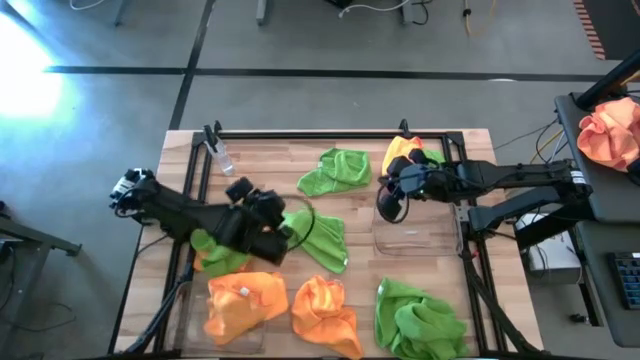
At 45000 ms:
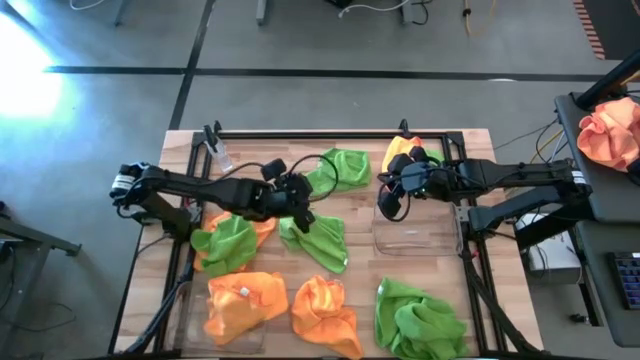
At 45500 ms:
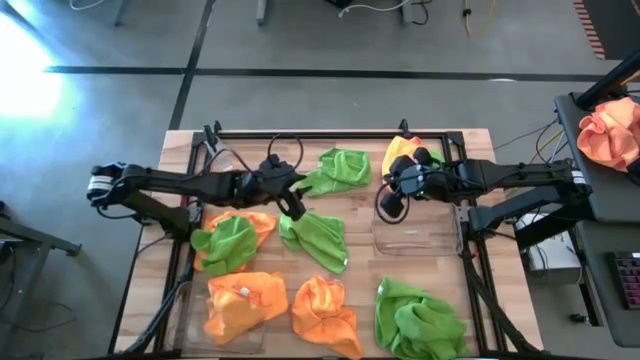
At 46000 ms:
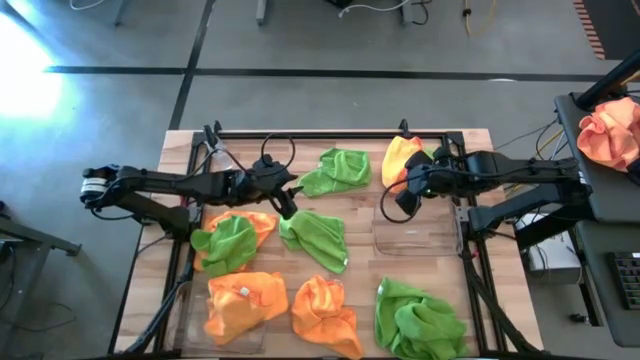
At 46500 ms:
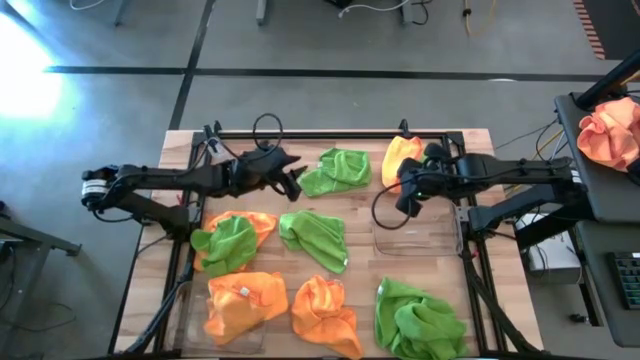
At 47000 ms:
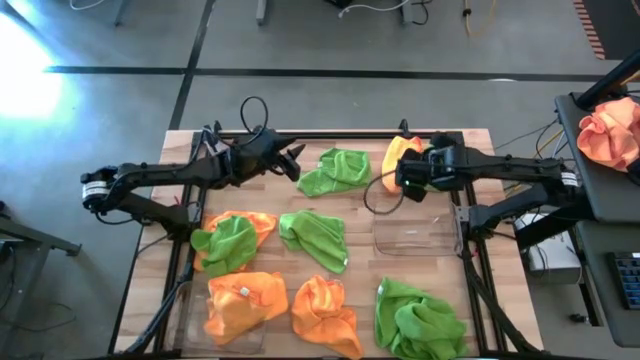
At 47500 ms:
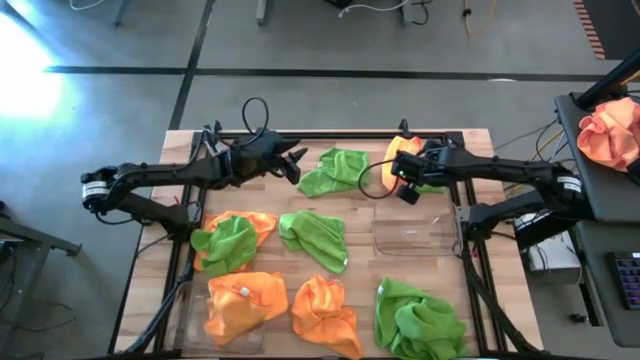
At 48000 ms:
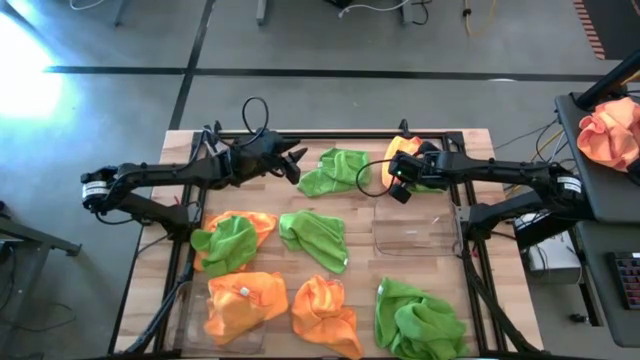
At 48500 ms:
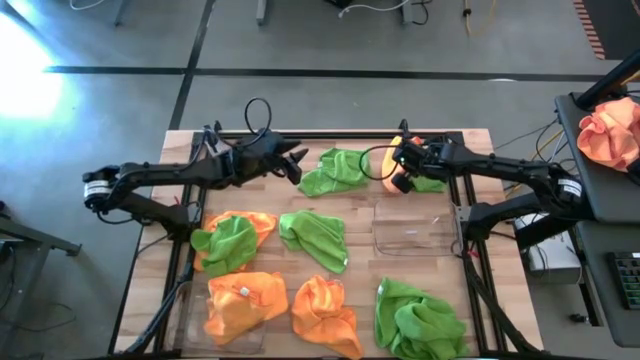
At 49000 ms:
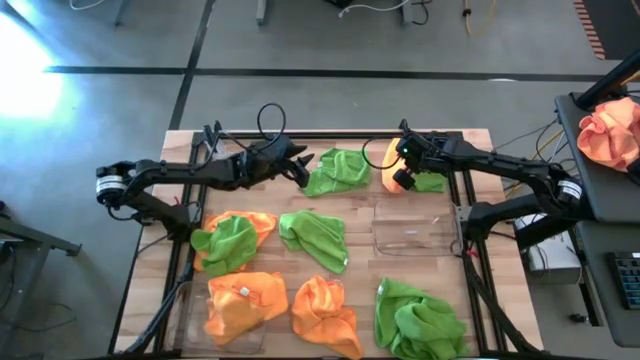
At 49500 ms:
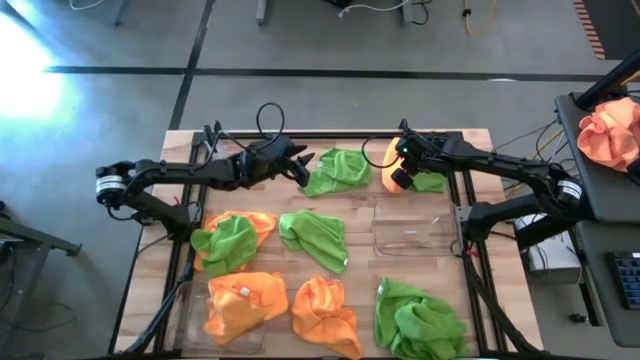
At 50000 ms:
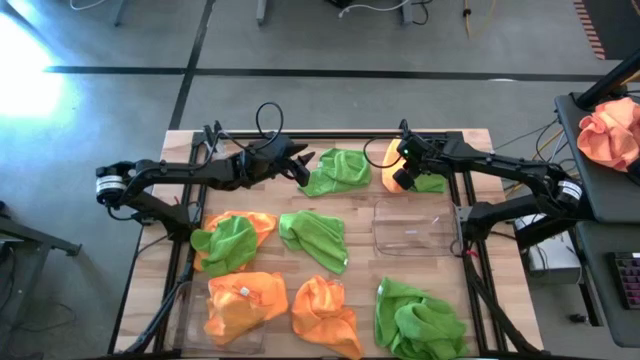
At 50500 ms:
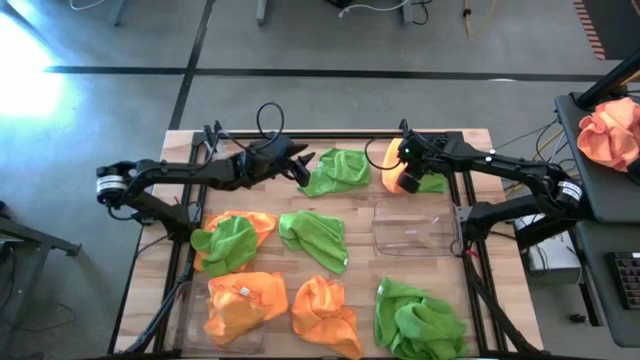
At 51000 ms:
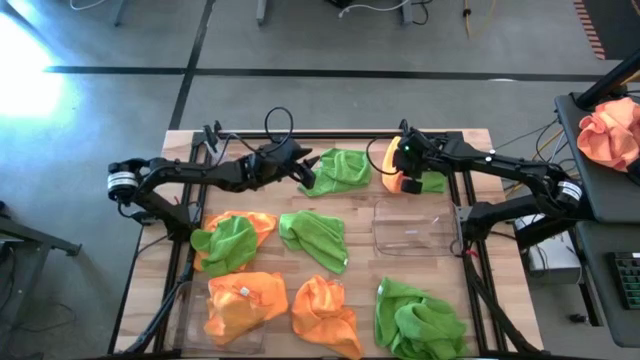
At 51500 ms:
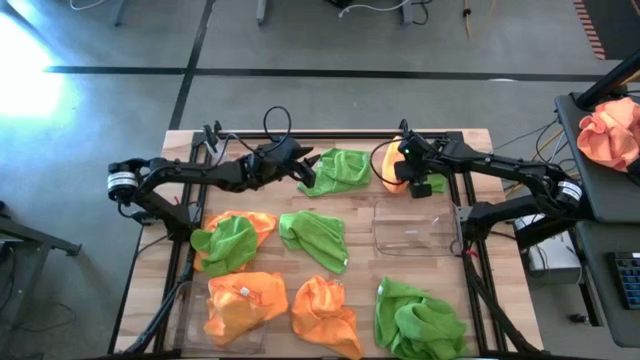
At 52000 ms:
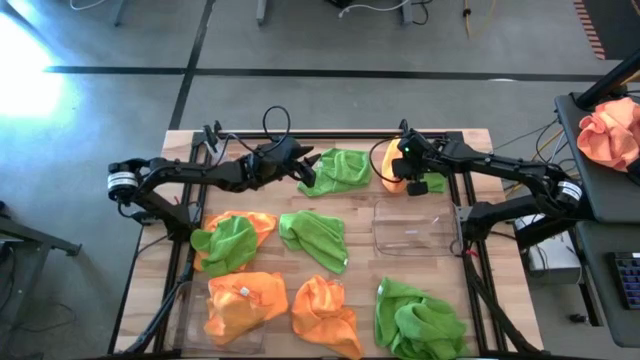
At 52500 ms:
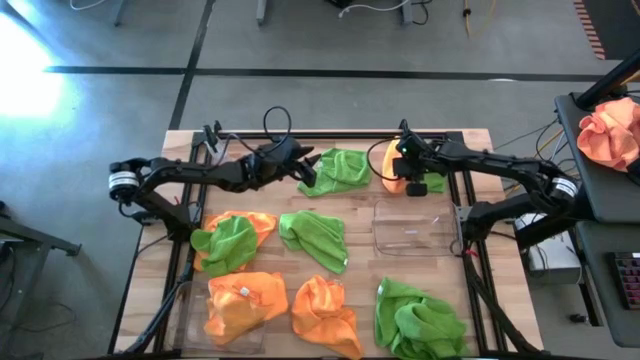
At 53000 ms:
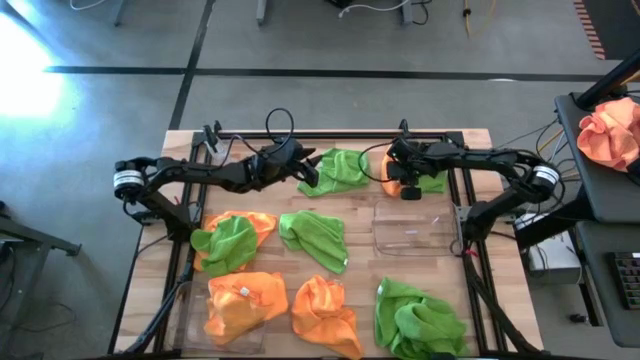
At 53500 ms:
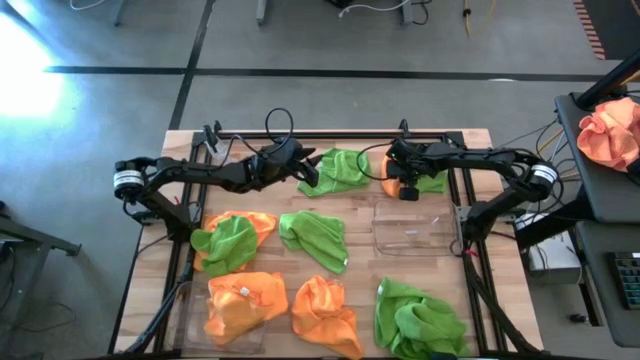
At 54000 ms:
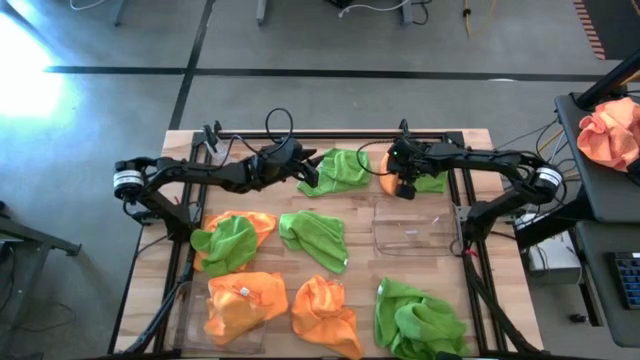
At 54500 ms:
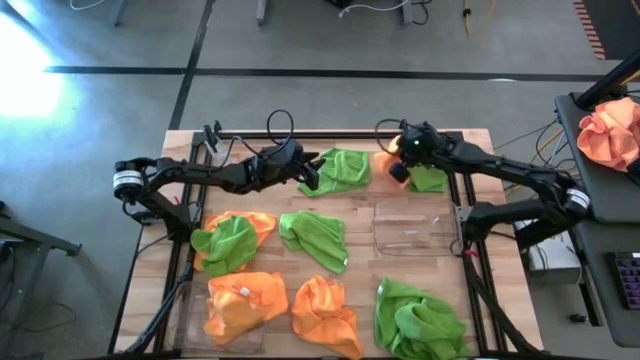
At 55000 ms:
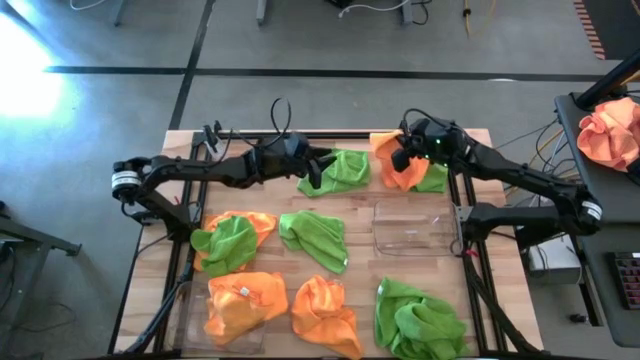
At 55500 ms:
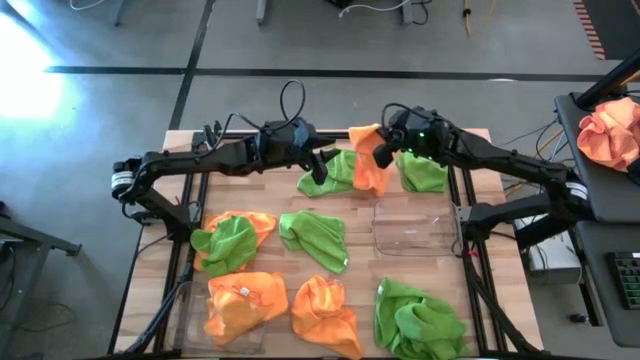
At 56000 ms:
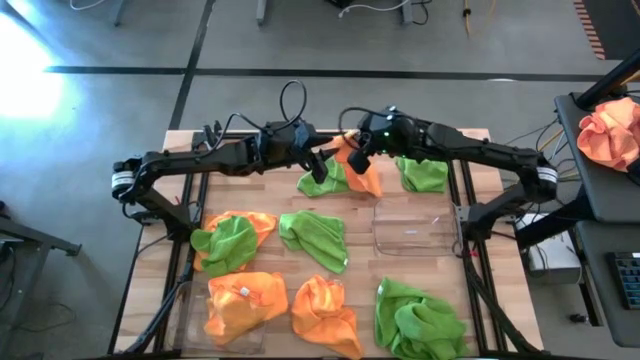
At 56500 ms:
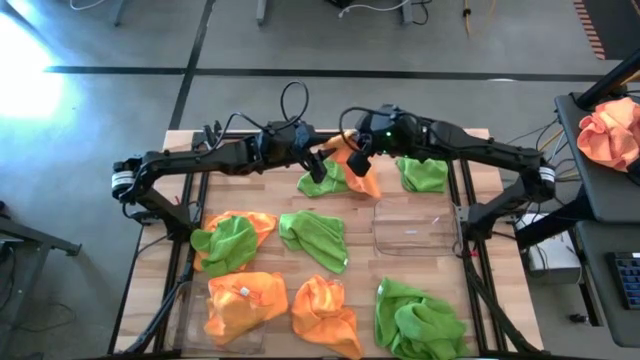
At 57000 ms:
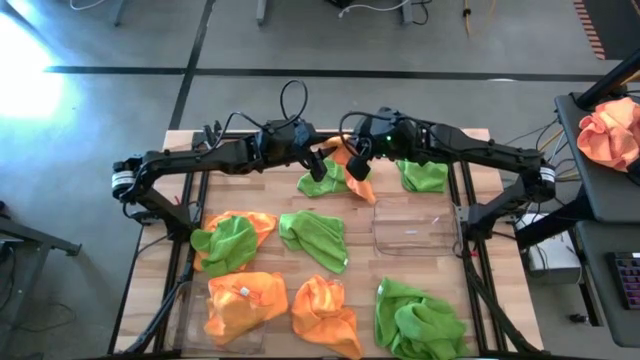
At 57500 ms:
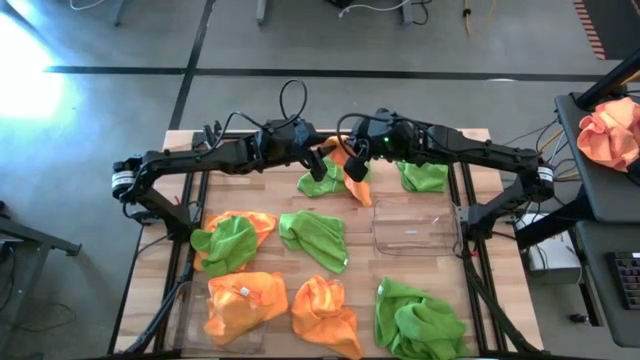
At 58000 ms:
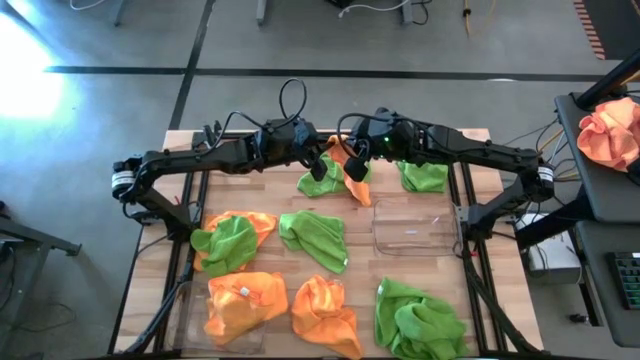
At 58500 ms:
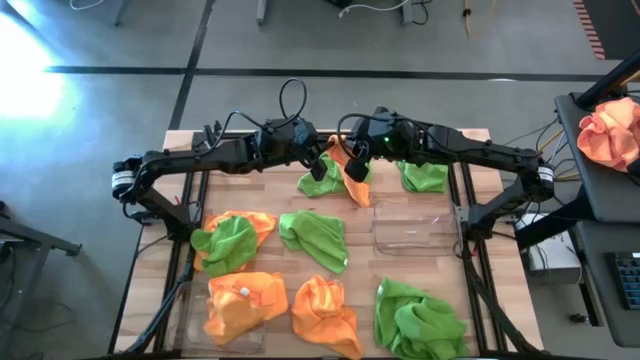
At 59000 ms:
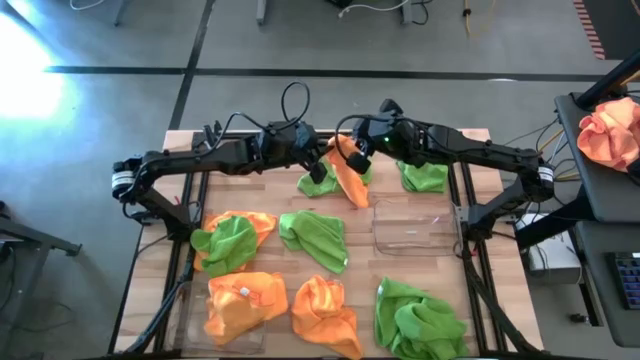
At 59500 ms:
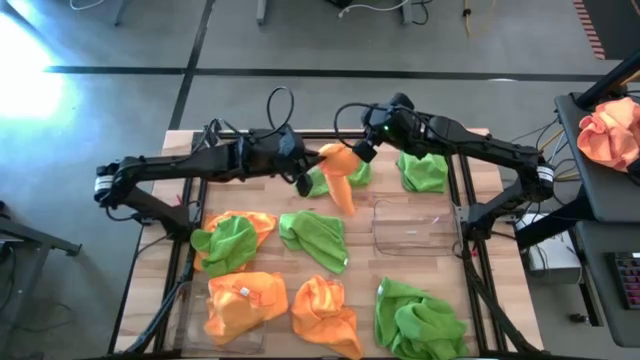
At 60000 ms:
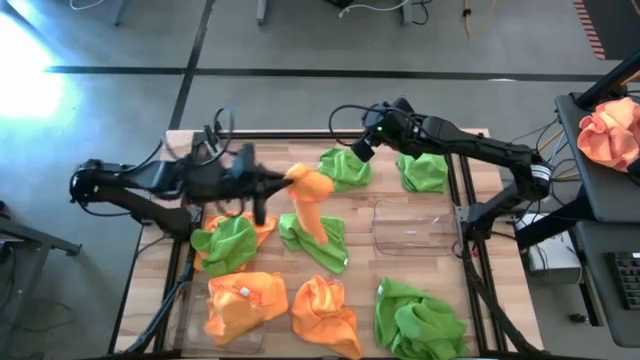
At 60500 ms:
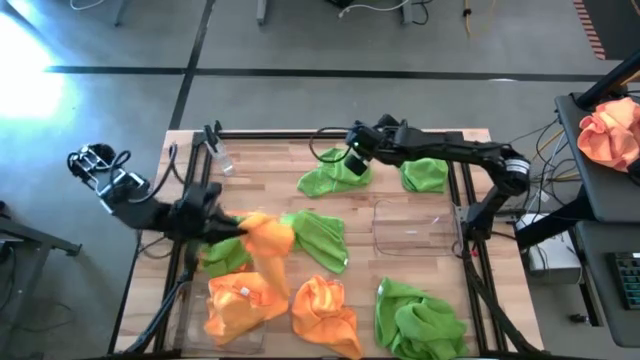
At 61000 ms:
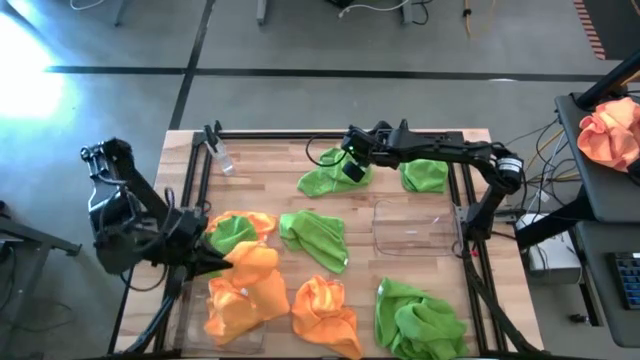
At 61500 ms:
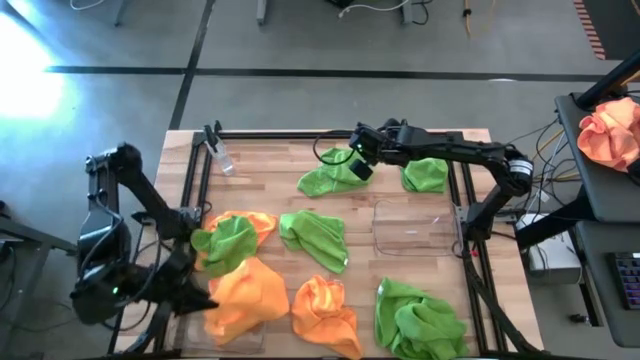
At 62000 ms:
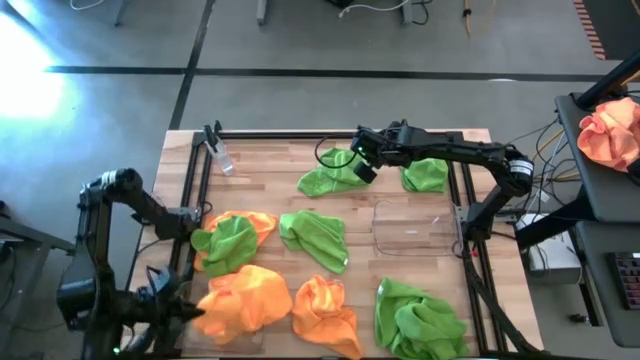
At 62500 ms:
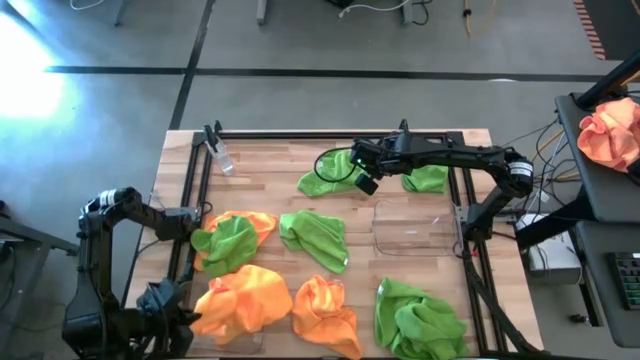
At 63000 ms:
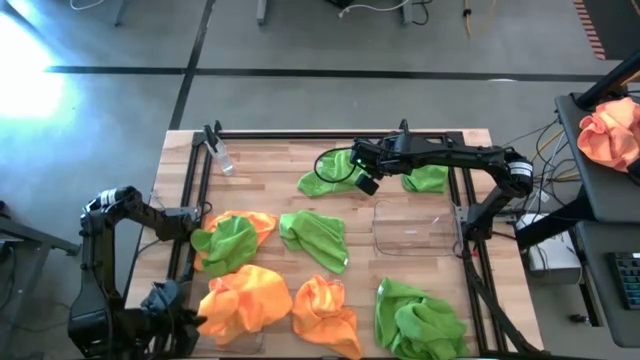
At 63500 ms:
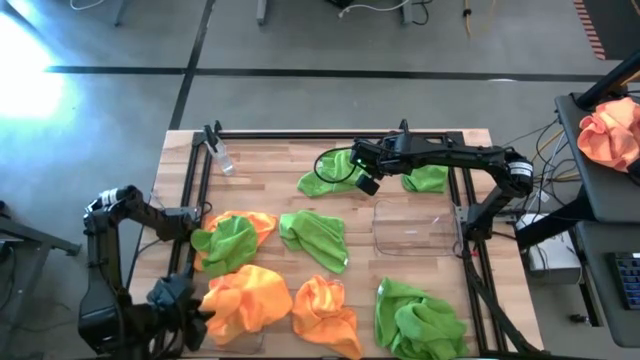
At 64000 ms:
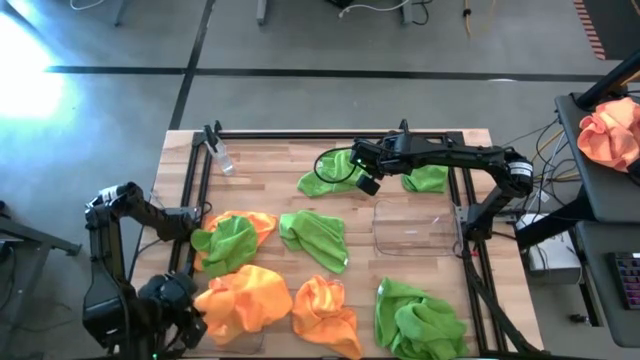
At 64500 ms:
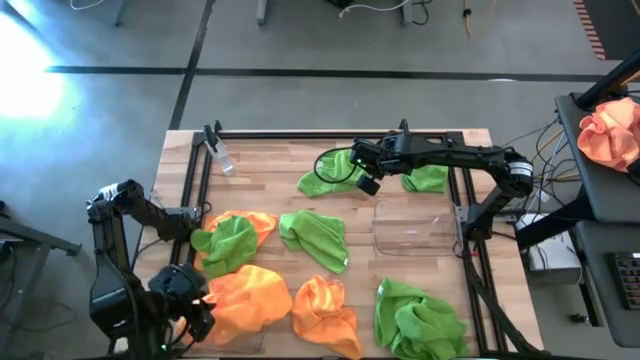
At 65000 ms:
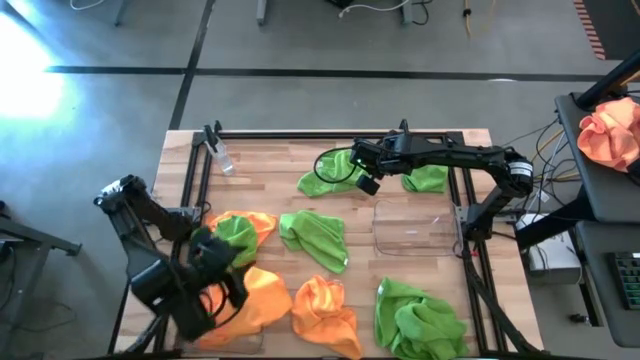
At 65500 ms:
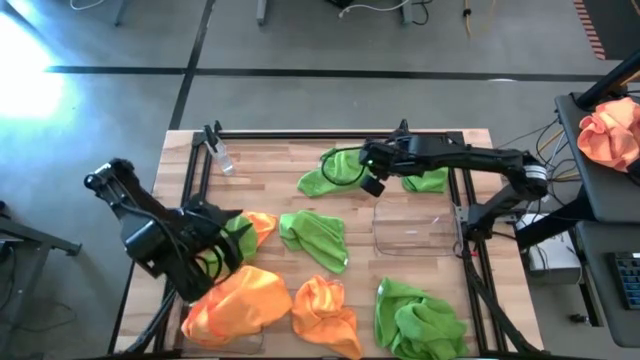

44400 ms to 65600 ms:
Task: Sort microfiber towel by color & place in baskets
Put the top right yellow towel into the left transparent bin
